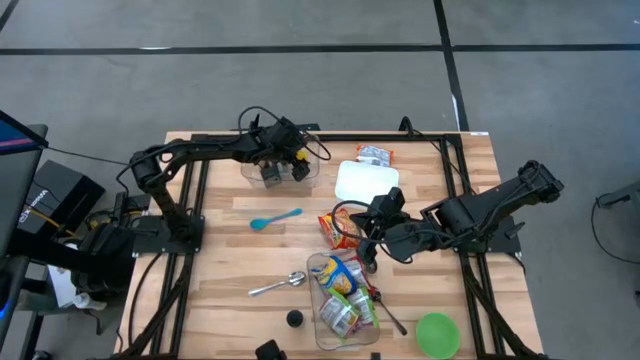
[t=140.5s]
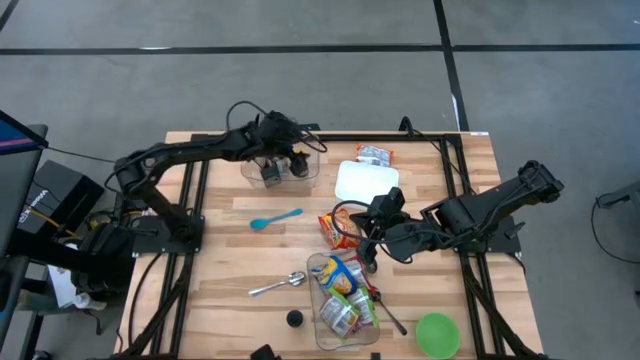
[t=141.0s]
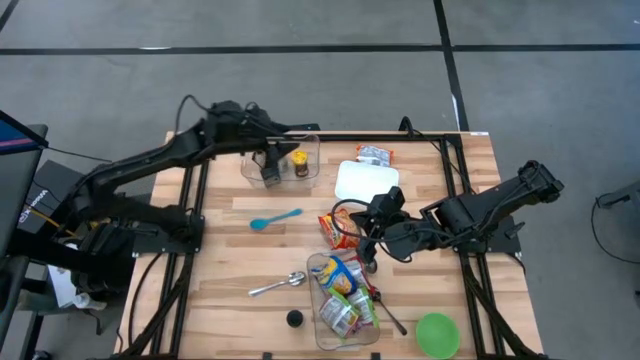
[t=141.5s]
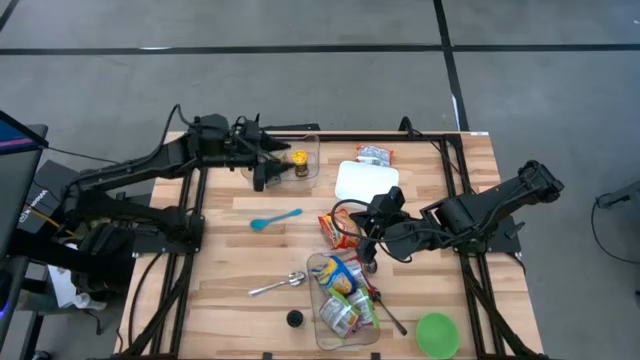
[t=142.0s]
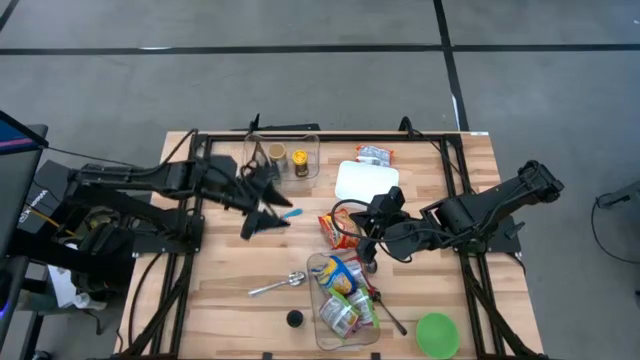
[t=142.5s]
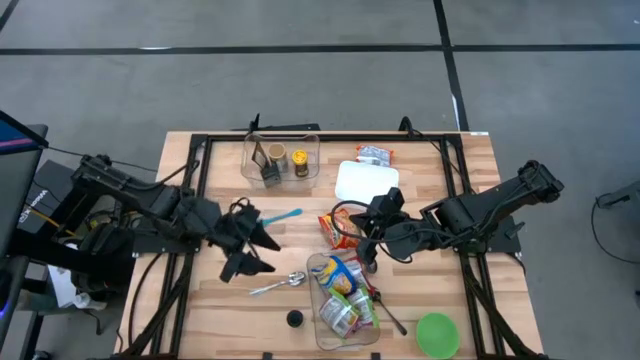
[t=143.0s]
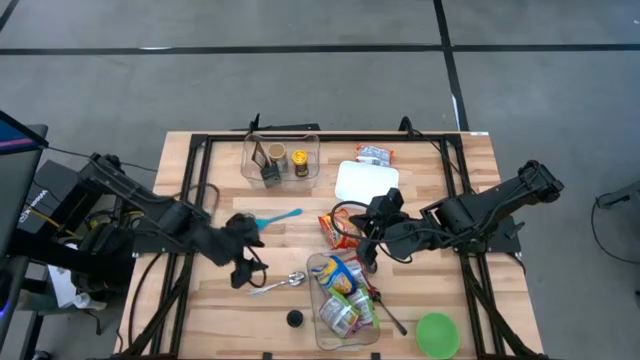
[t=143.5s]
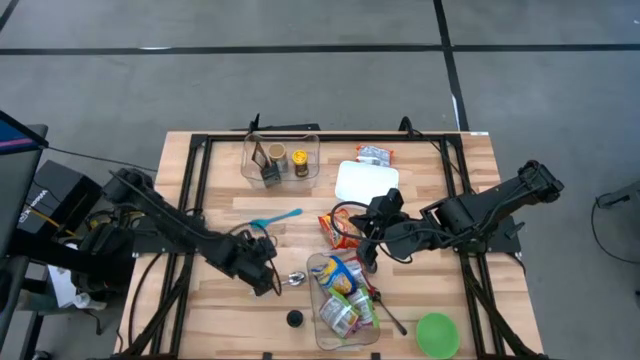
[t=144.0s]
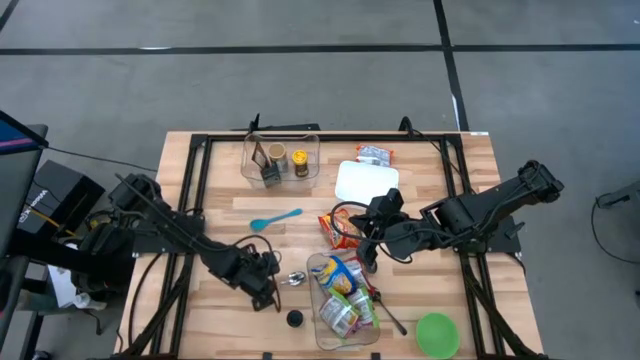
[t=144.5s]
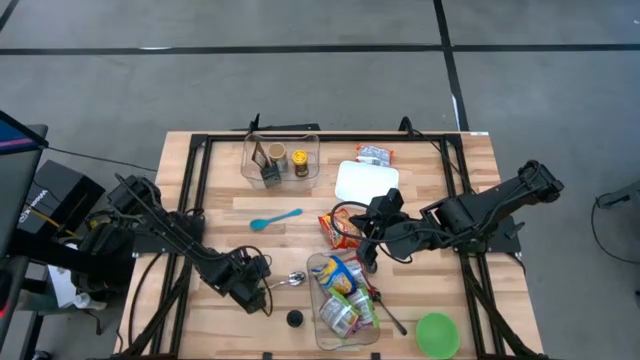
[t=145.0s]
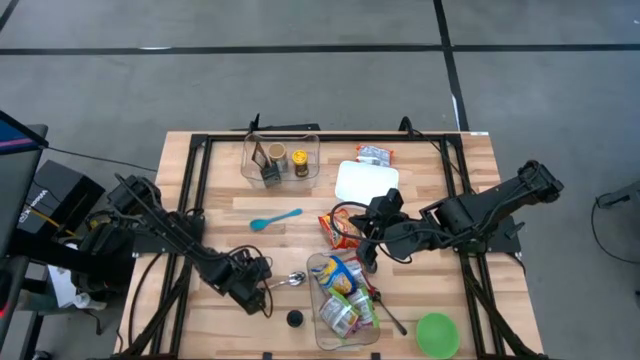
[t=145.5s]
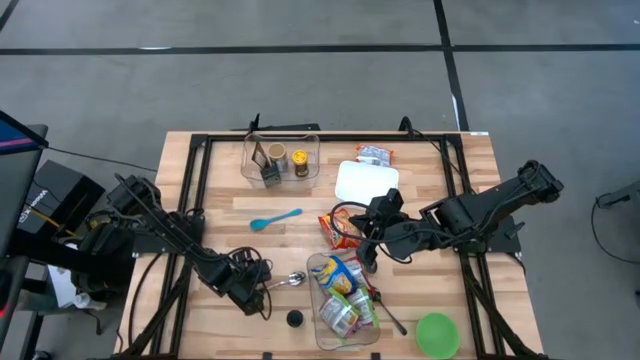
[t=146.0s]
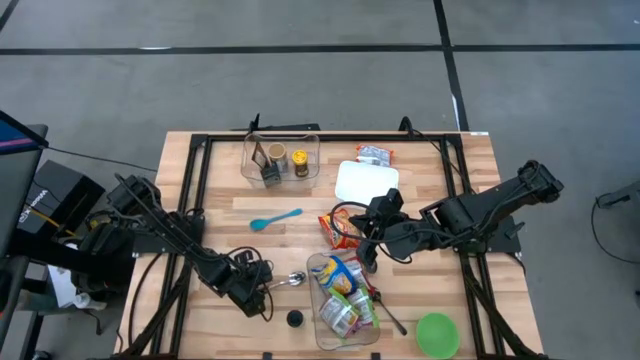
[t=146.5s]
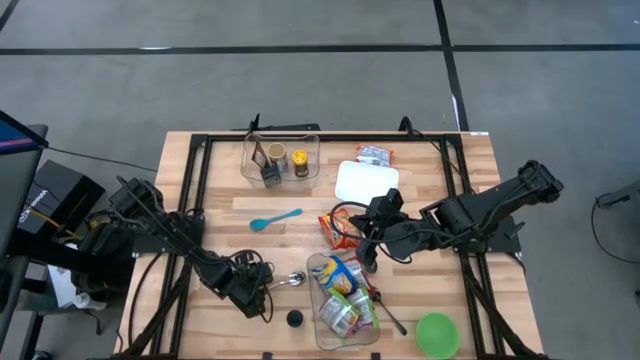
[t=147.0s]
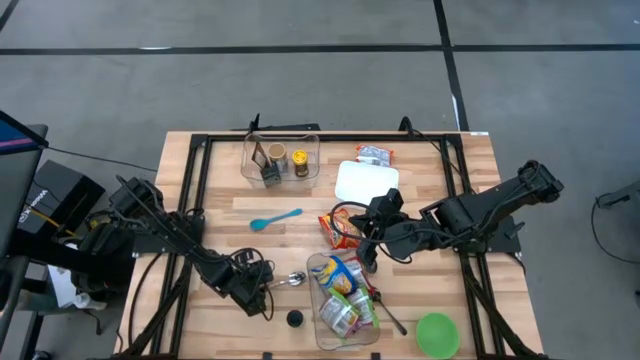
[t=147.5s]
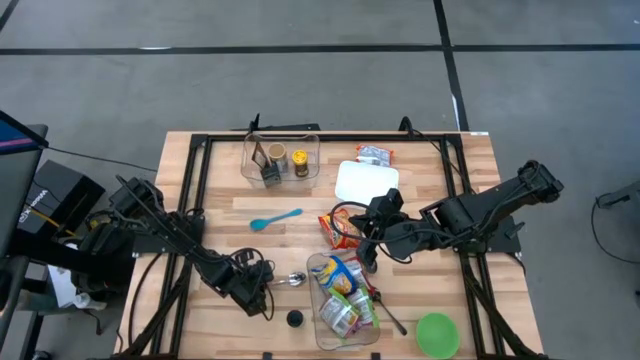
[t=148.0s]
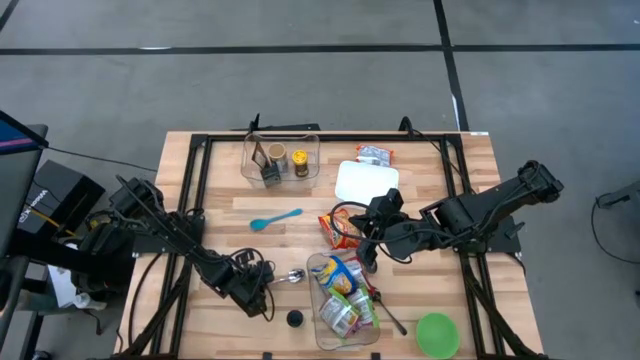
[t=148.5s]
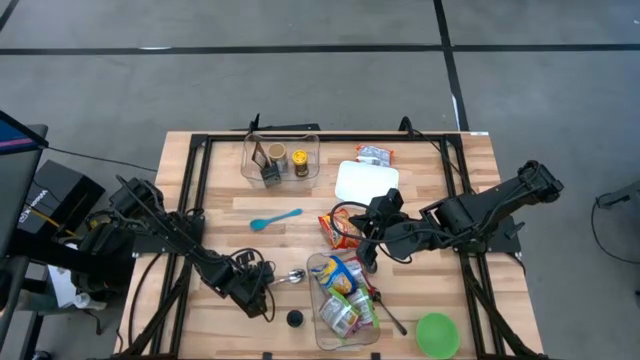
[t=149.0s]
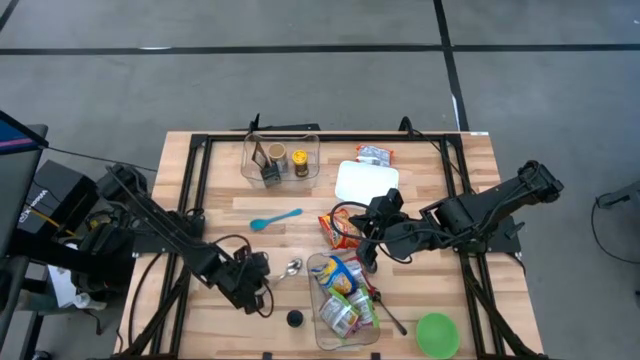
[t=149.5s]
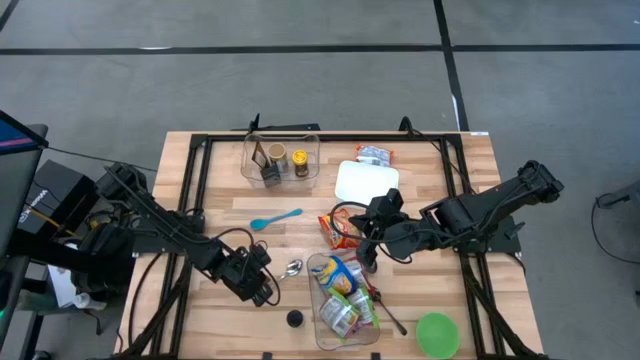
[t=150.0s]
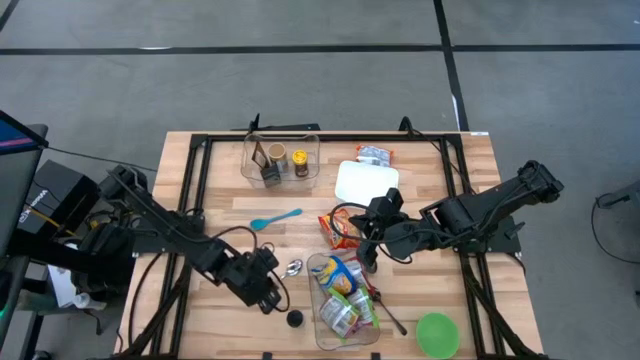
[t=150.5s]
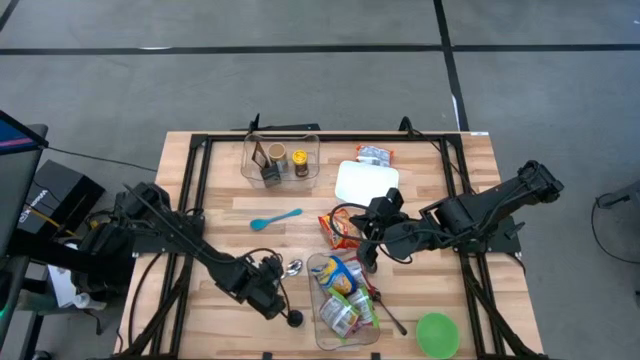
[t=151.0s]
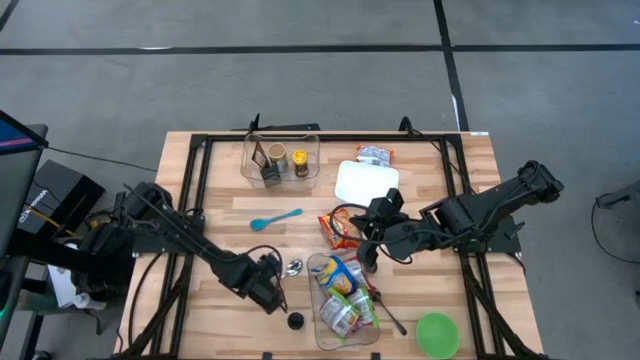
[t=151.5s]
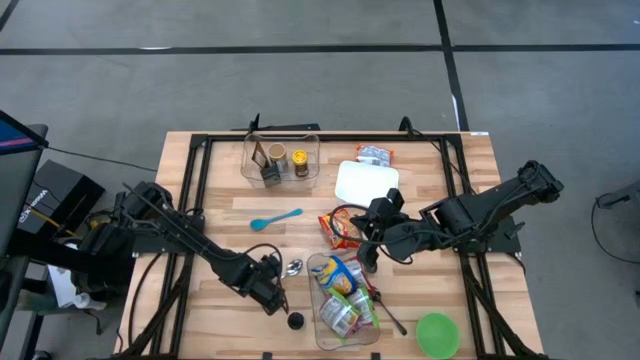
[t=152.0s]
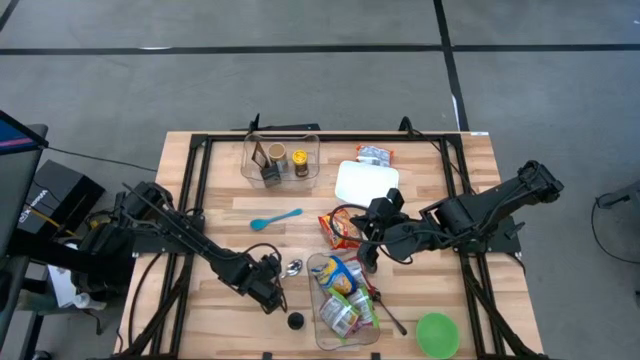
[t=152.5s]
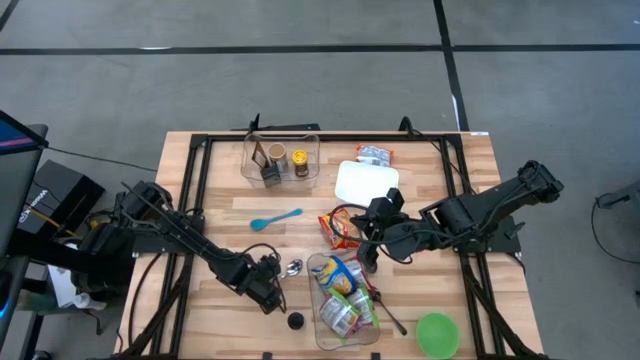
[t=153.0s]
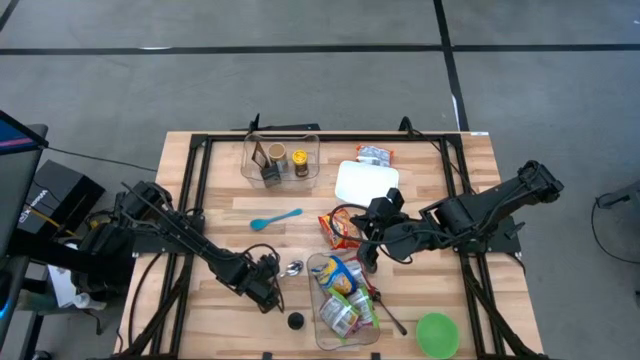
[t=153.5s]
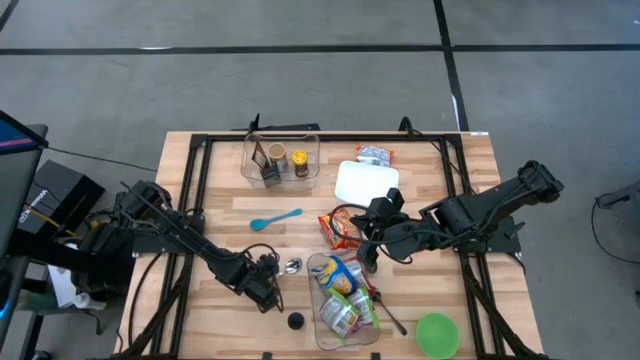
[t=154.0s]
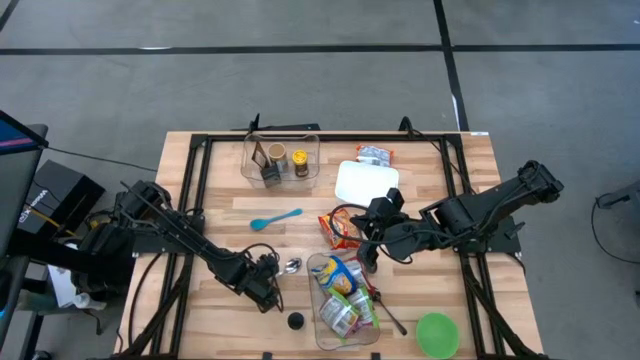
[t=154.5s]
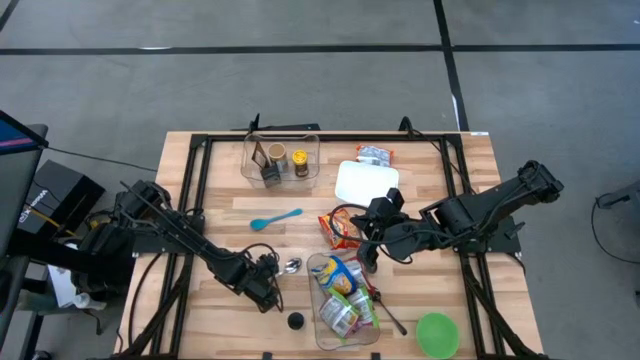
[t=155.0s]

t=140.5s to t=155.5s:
Task: Pick & Place Food Item
Put the silver spoon into the white bin

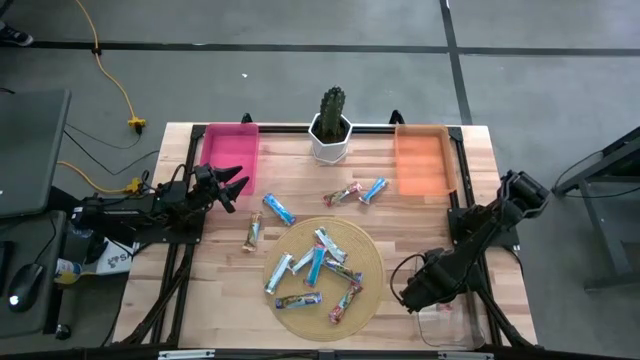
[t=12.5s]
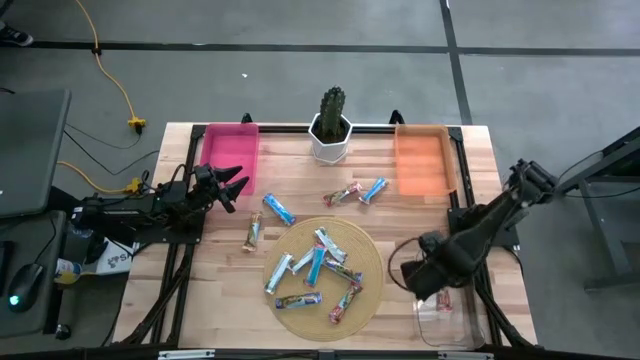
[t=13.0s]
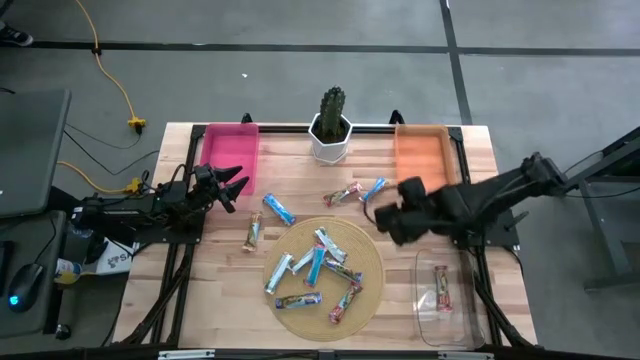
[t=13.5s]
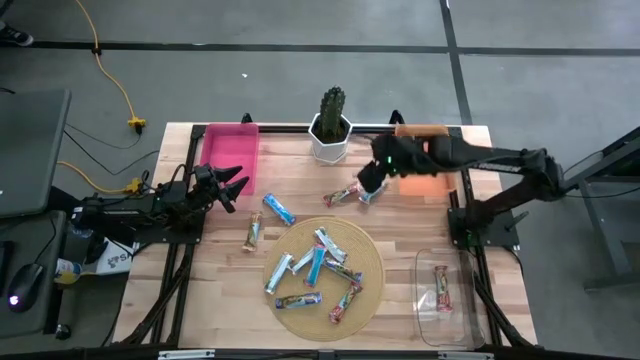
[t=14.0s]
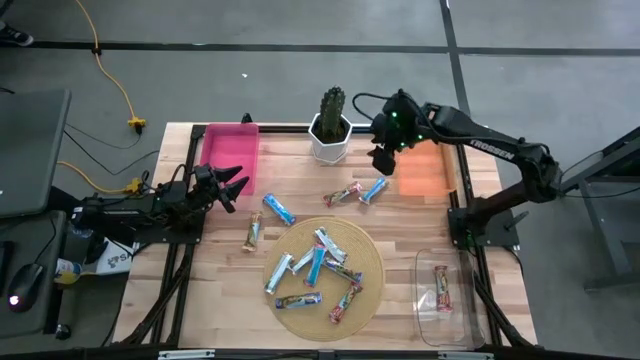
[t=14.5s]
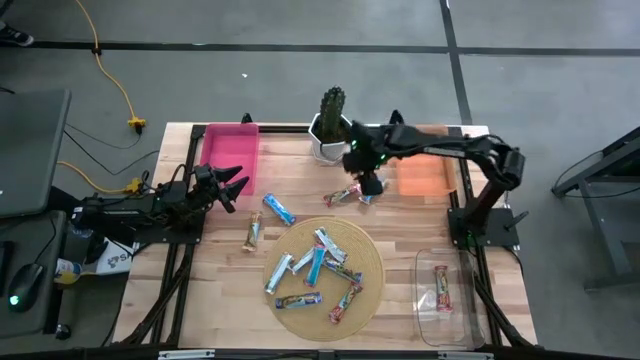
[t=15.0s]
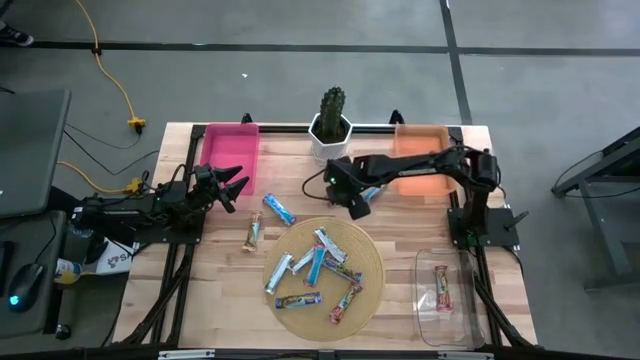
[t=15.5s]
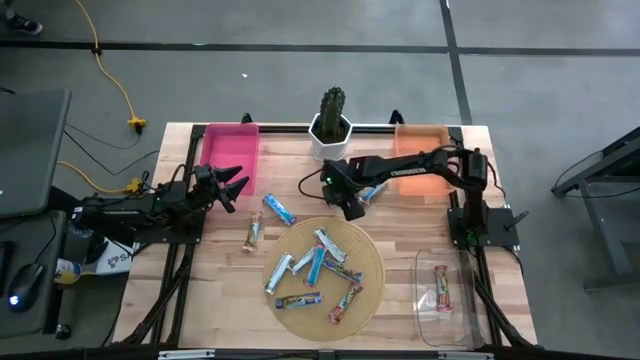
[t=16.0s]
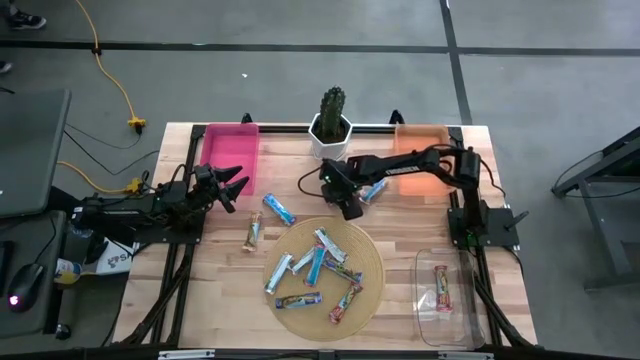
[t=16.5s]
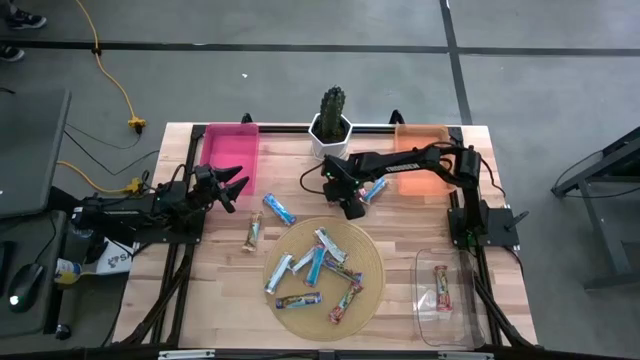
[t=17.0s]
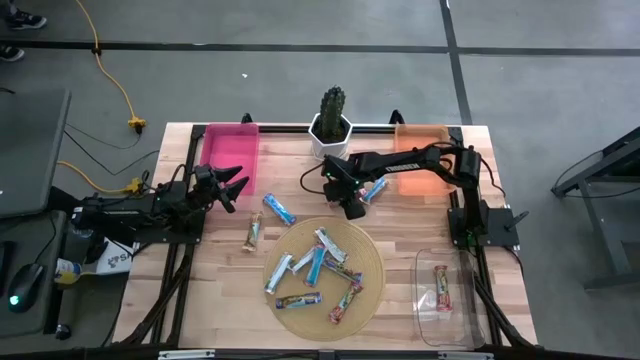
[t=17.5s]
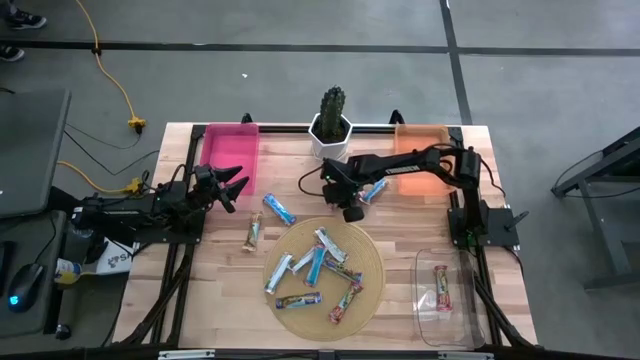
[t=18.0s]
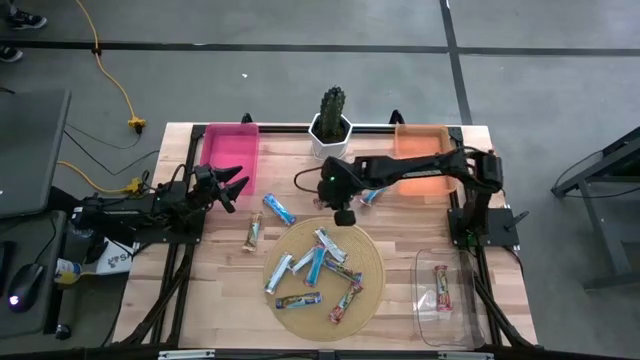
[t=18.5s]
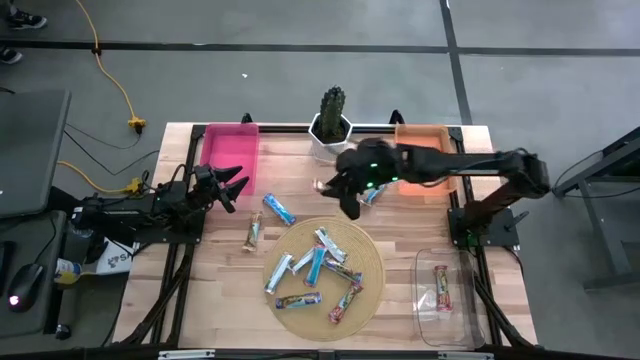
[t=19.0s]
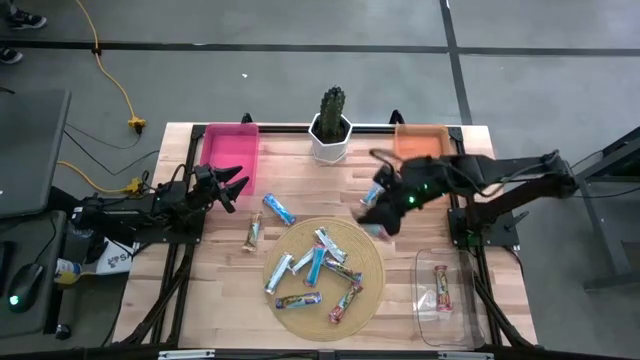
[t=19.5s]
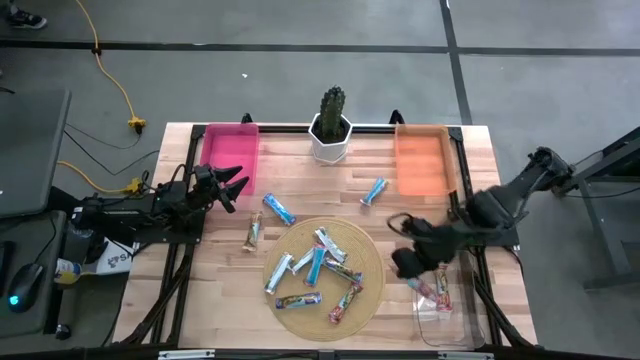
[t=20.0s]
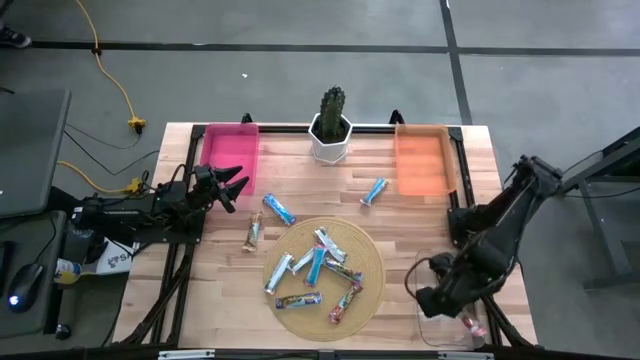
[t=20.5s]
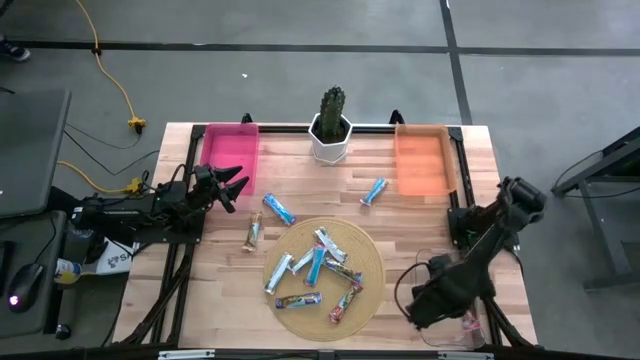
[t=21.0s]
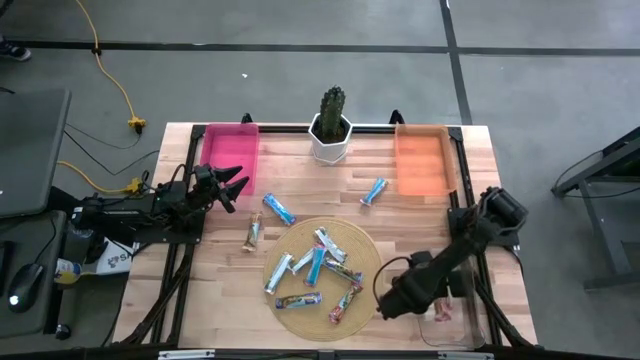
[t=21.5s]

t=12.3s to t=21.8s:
Task: Pick and place Granola Bars by type
Put the red granola bar into the transparent bin
